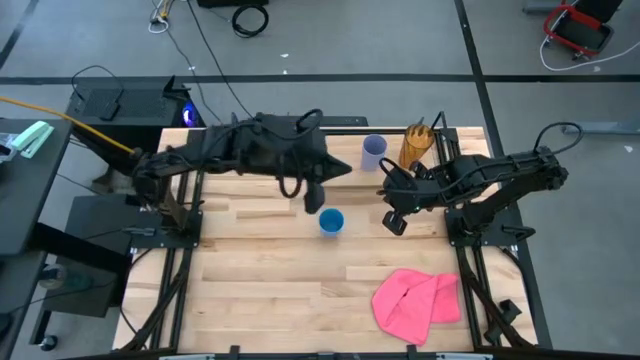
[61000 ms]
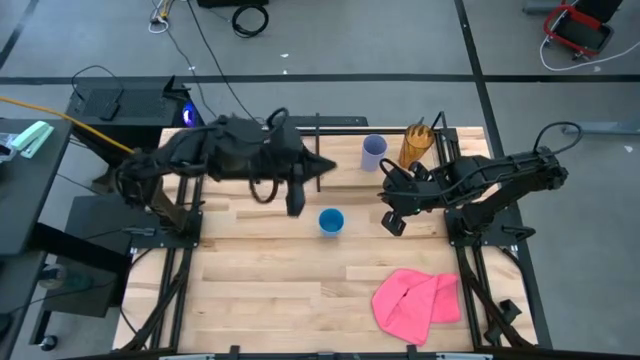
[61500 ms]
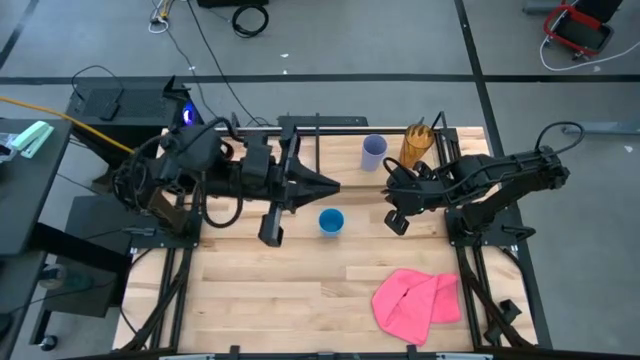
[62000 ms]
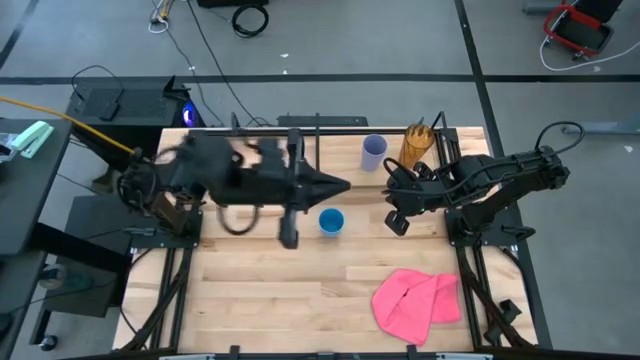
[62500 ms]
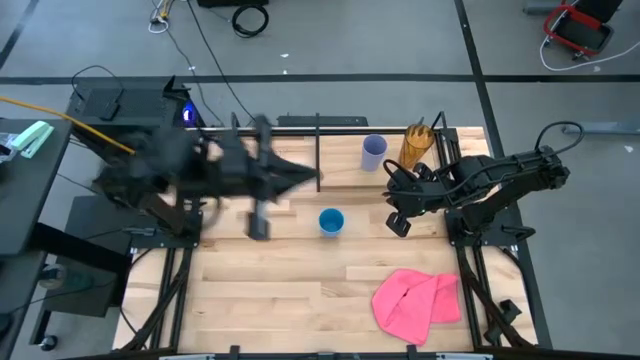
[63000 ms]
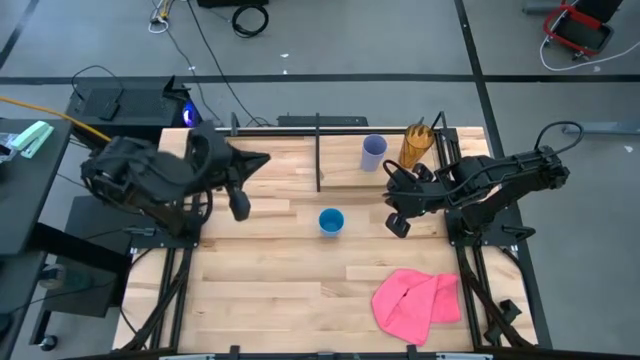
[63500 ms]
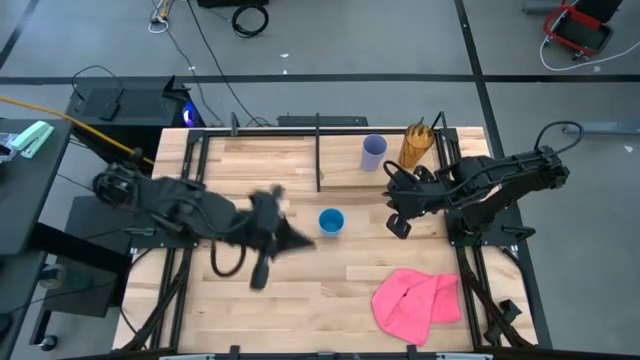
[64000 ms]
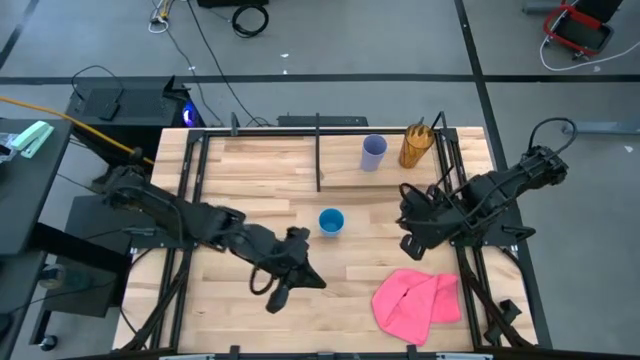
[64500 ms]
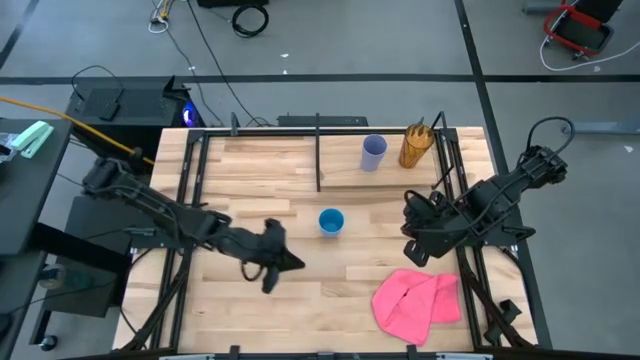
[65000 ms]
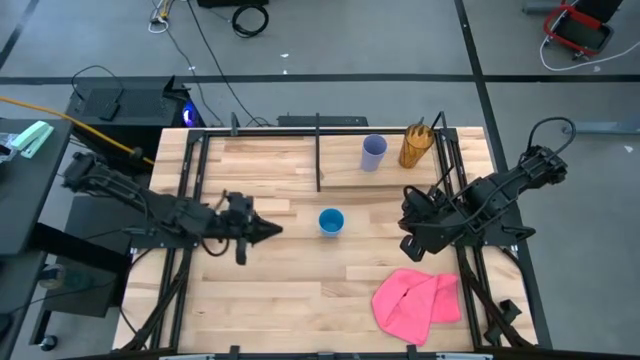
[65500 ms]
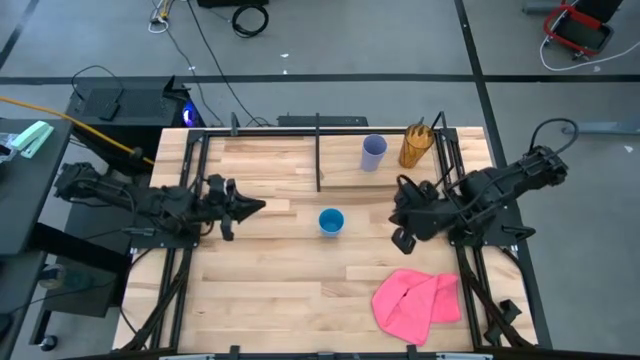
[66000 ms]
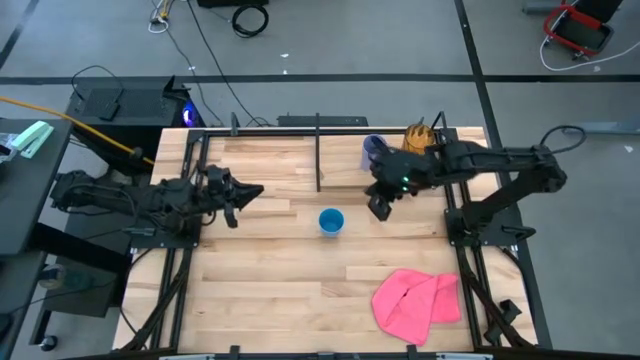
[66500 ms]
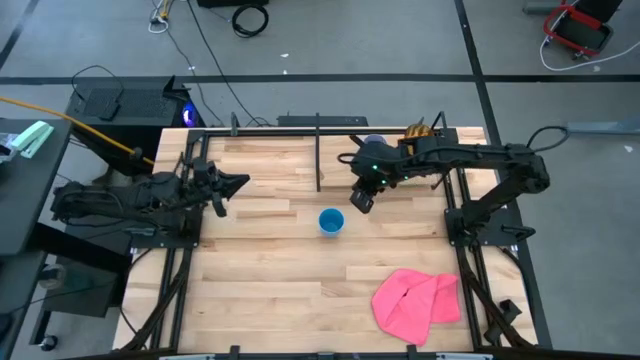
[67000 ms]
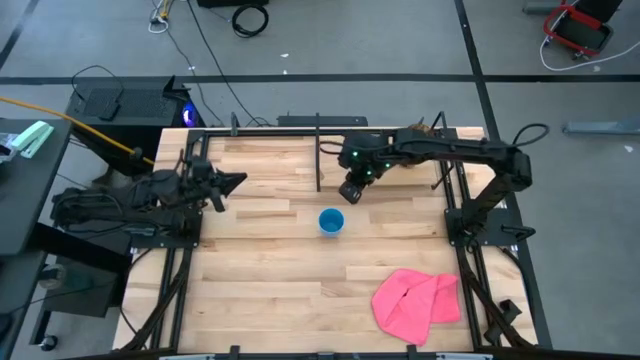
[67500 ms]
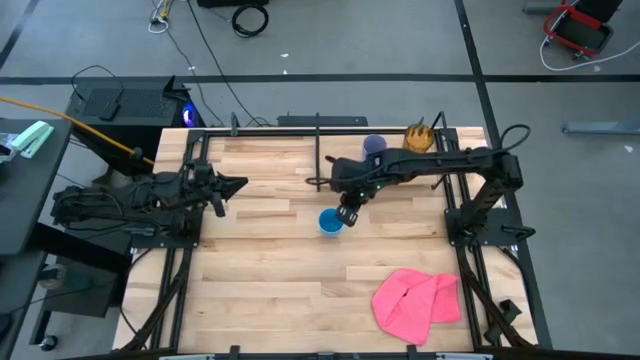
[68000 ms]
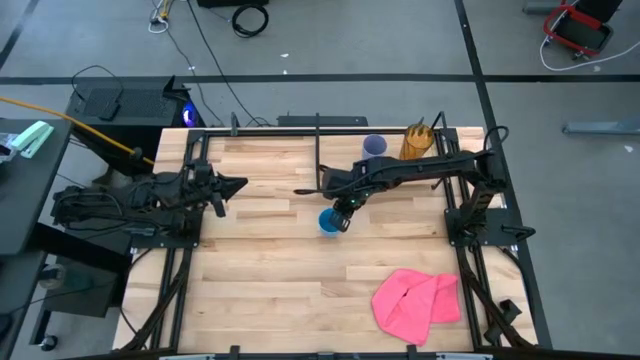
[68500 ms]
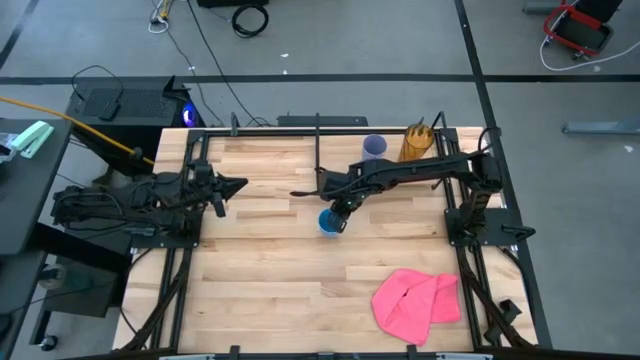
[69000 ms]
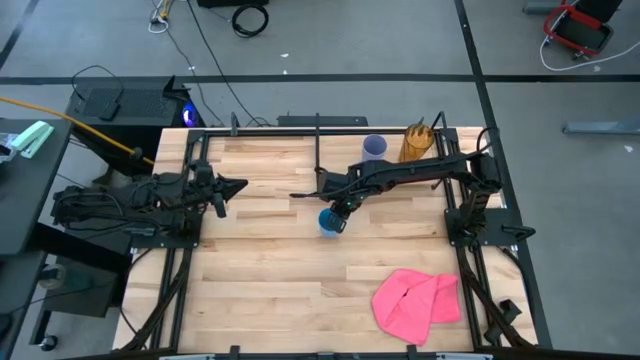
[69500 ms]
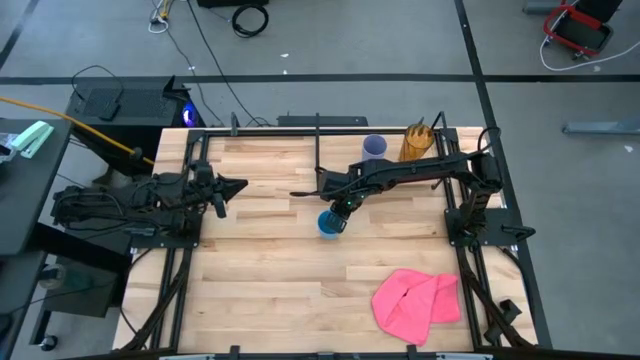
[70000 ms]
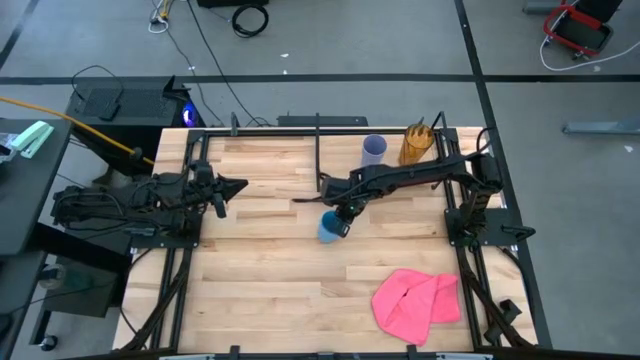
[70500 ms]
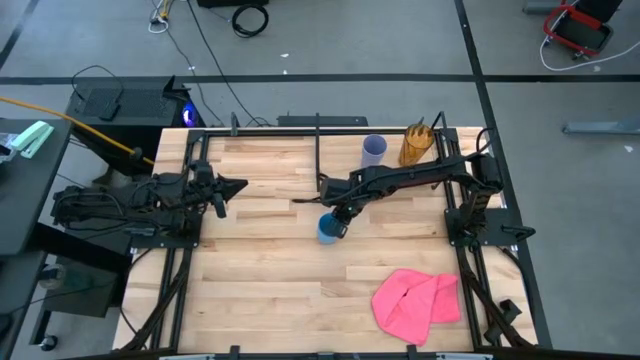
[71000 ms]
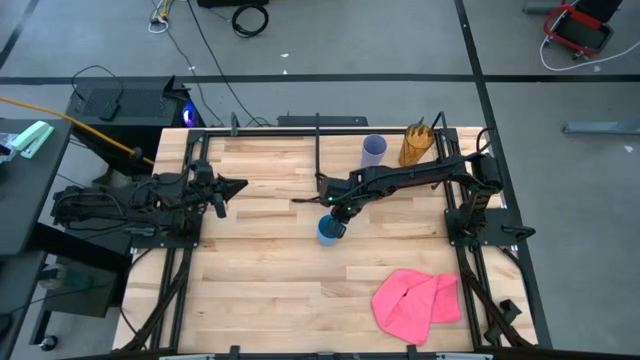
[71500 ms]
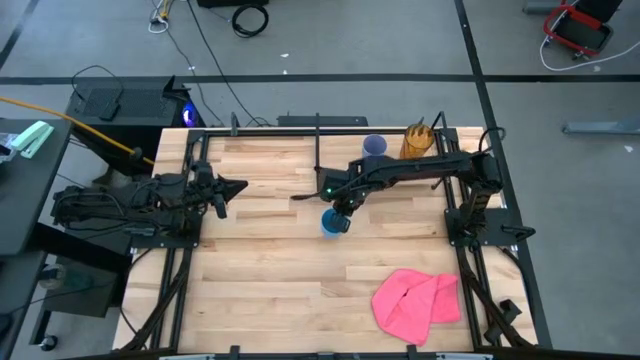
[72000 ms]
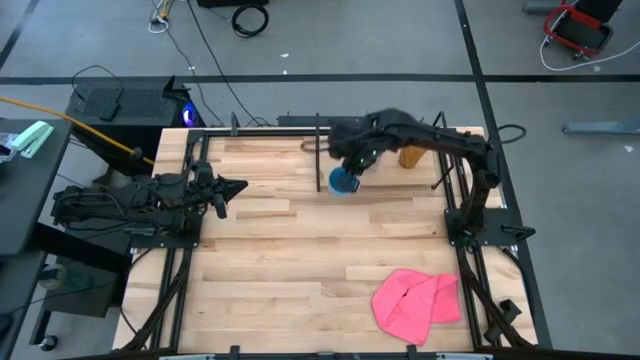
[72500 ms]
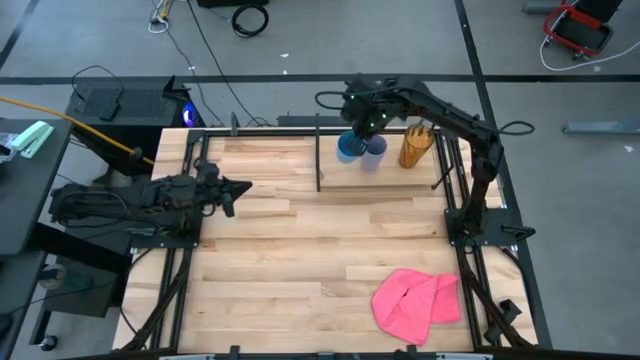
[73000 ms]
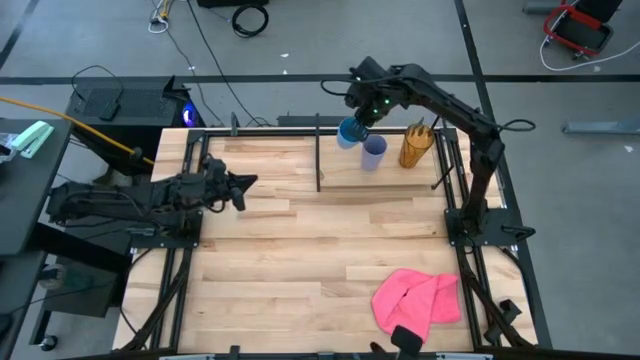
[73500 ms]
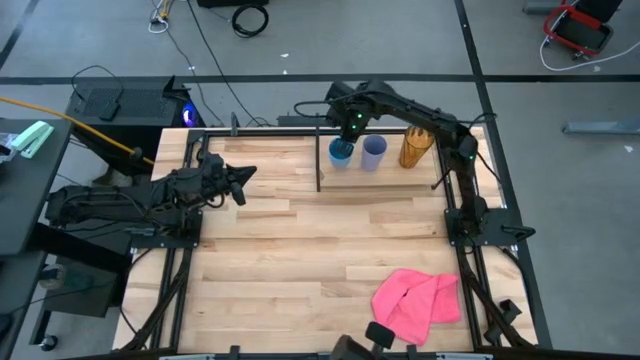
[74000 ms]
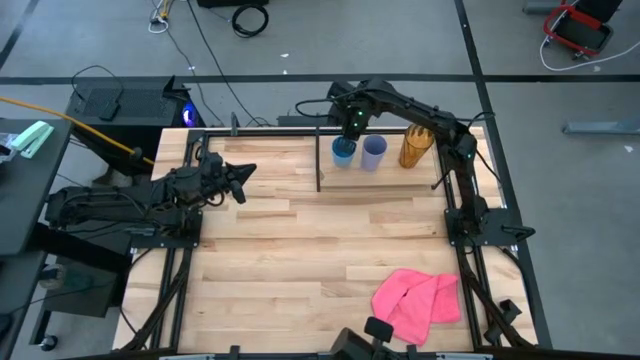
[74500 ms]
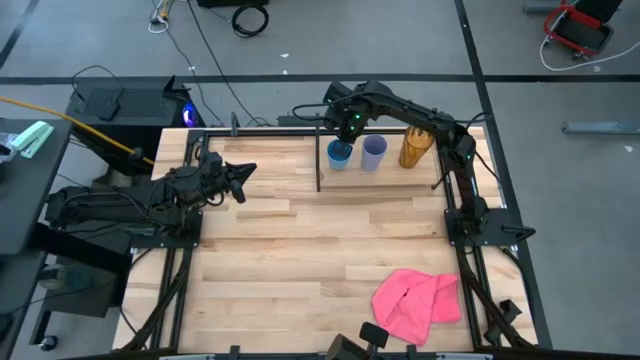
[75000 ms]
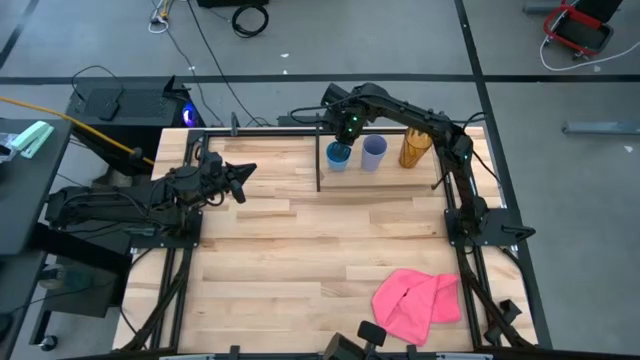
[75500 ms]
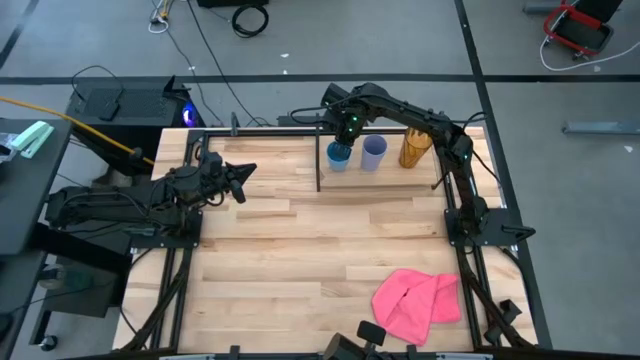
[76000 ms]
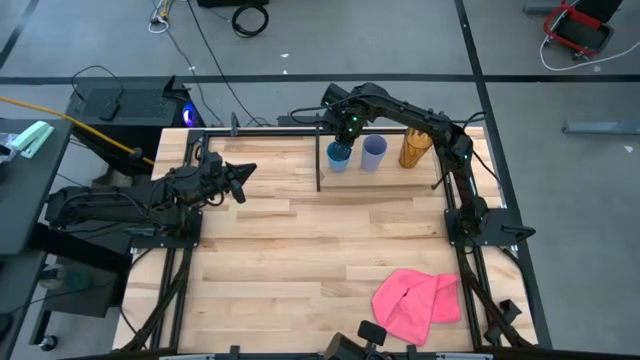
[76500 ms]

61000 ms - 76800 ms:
Task: Stack small to large cups/mugs on shelf
Put the blue cup on the shelf

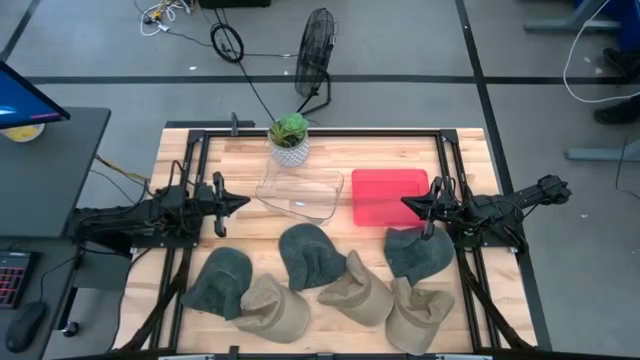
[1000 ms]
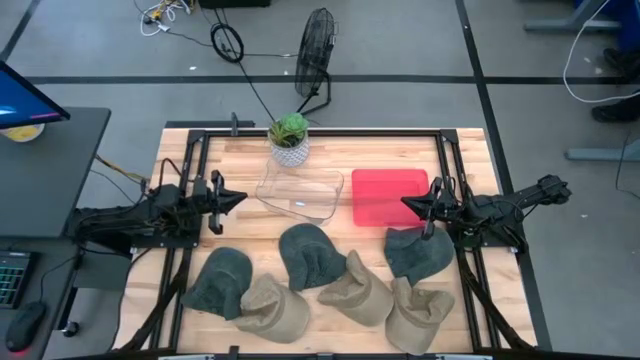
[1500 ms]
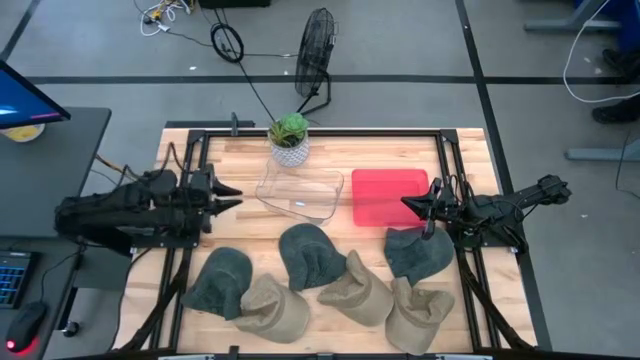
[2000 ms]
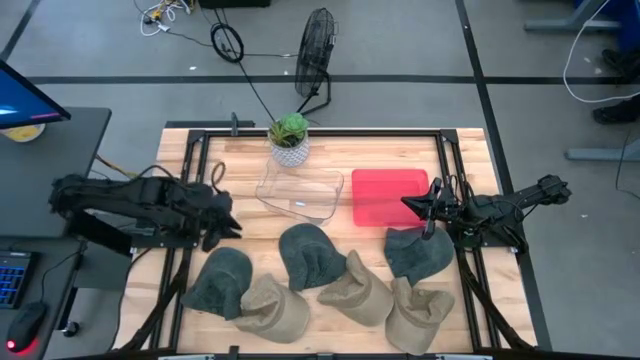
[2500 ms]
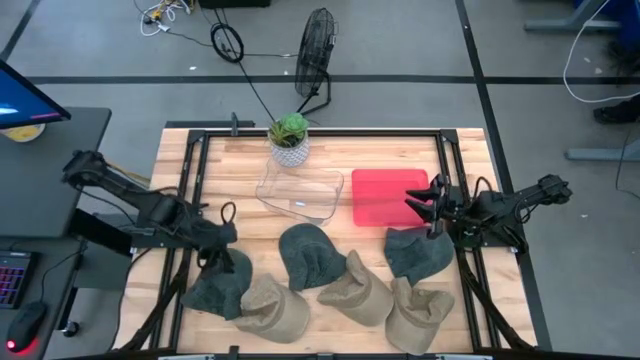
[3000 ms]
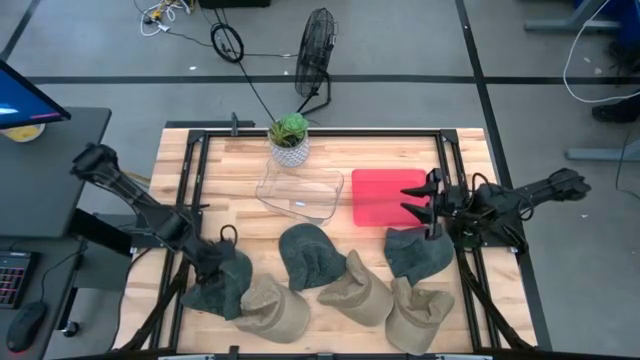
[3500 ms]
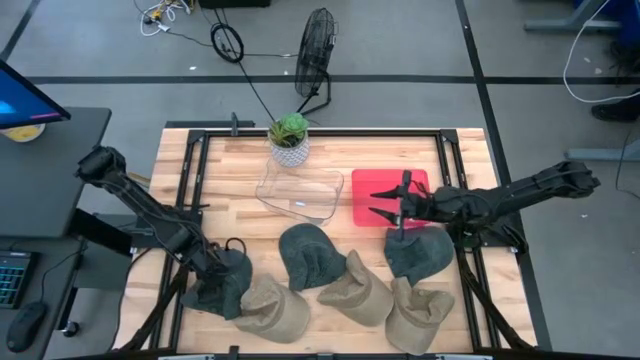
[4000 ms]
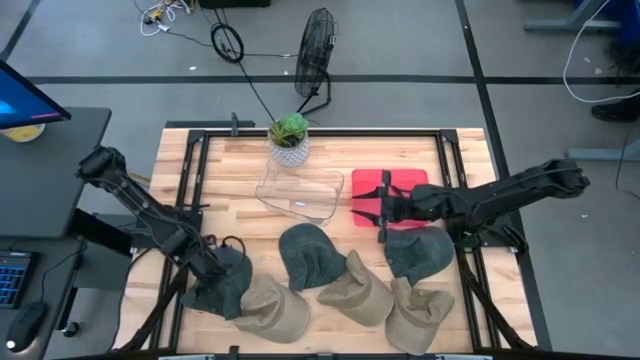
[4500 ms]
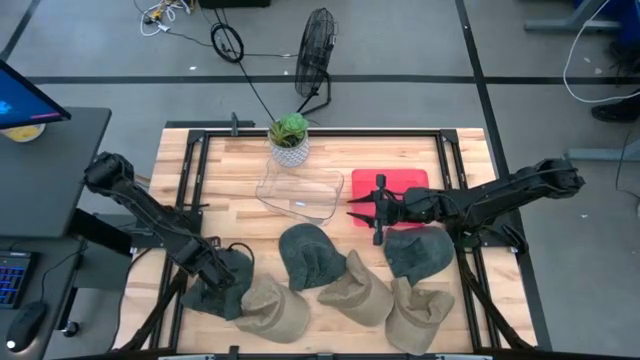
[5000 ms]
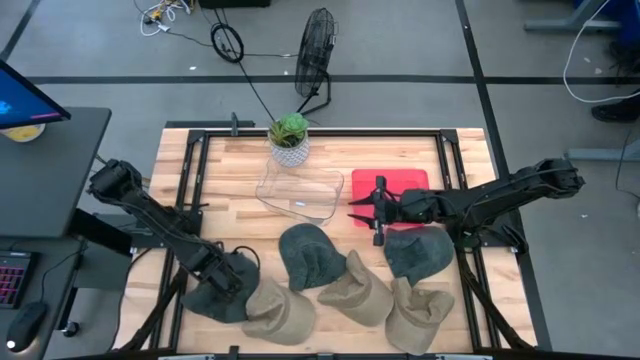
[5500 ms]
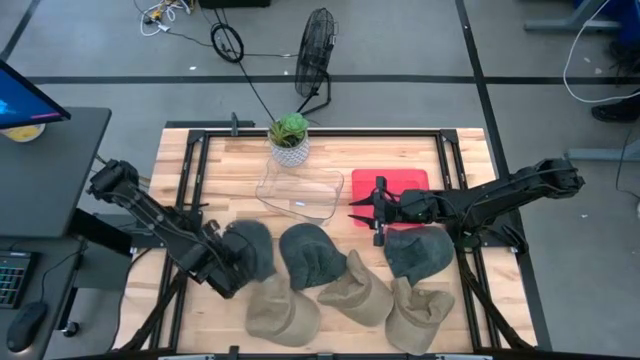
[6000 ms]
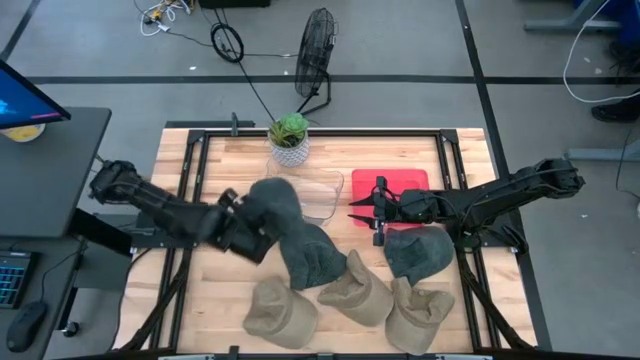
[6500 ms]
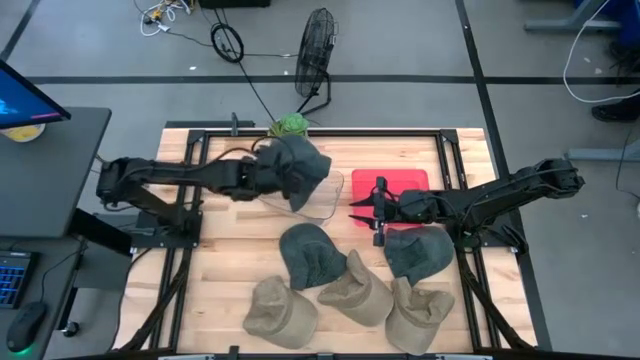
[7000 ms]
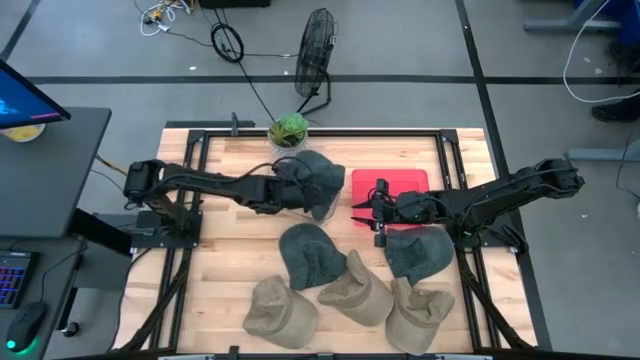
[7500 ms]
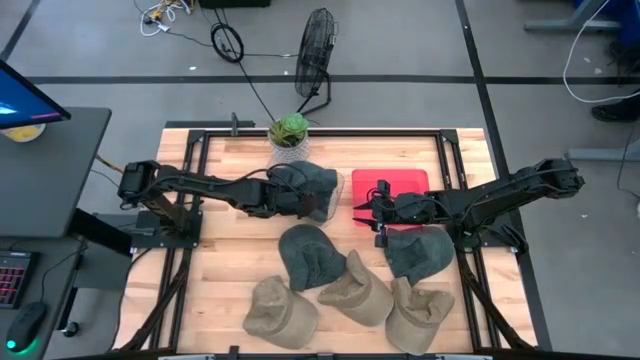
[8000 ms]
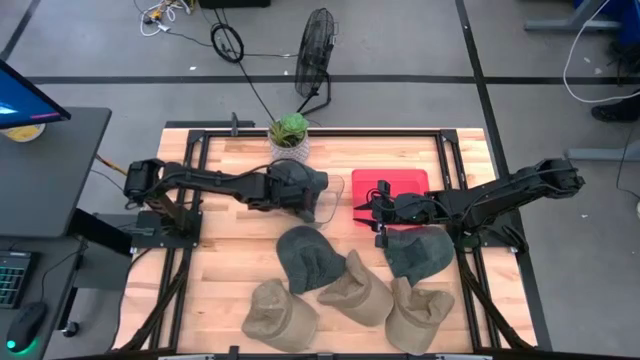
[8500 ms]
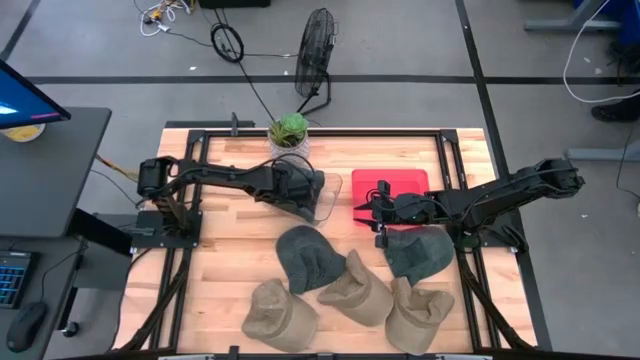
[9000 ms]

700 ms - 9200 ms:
Task: Pick & Place hat
Put the left green cap into the transparent bin
